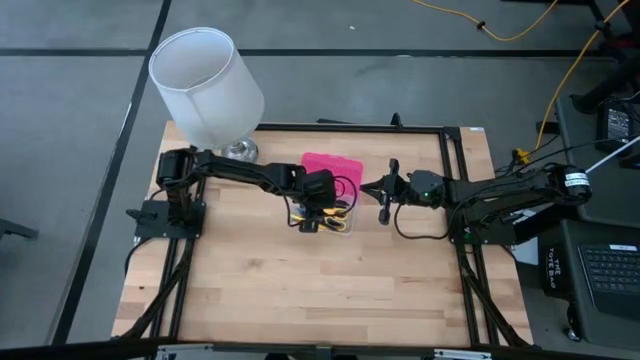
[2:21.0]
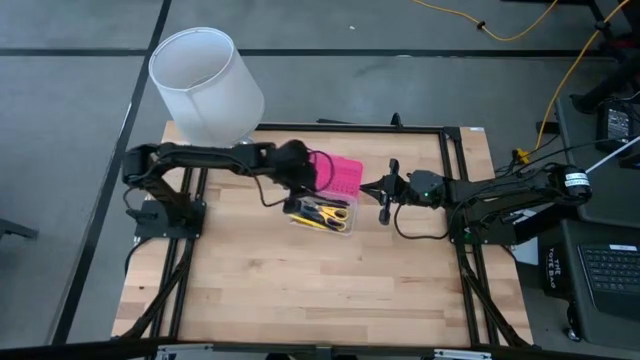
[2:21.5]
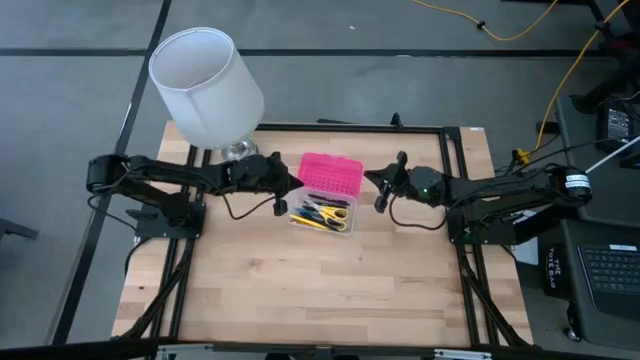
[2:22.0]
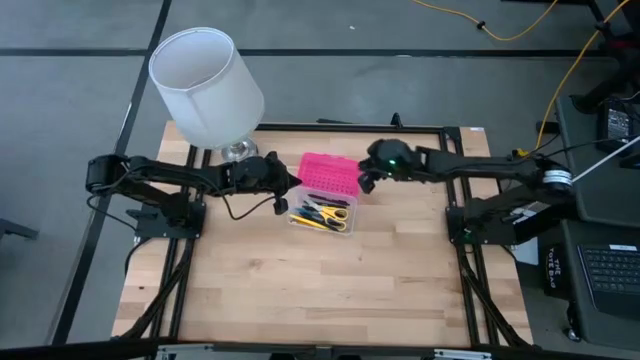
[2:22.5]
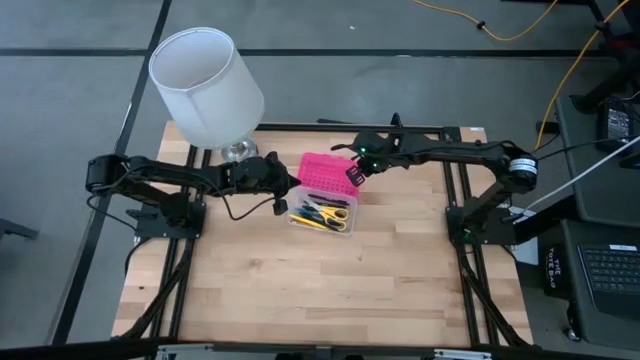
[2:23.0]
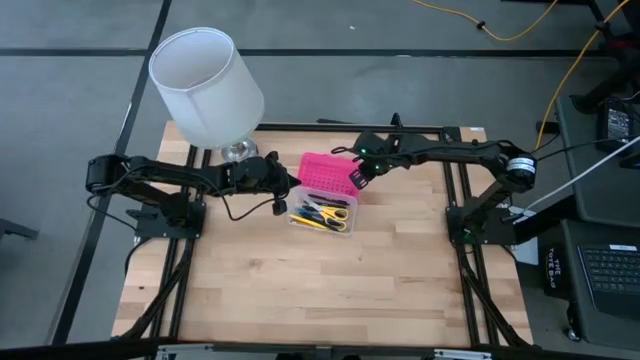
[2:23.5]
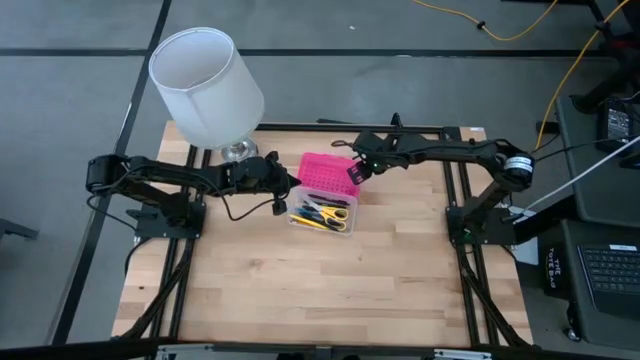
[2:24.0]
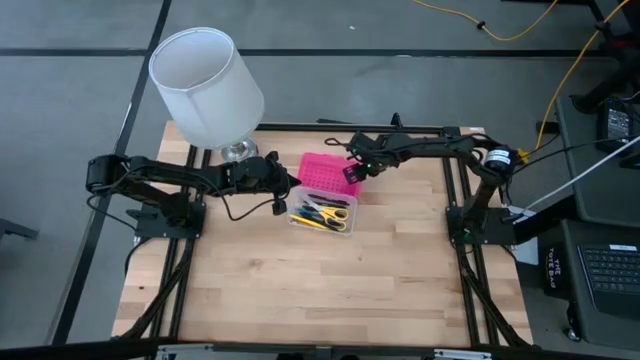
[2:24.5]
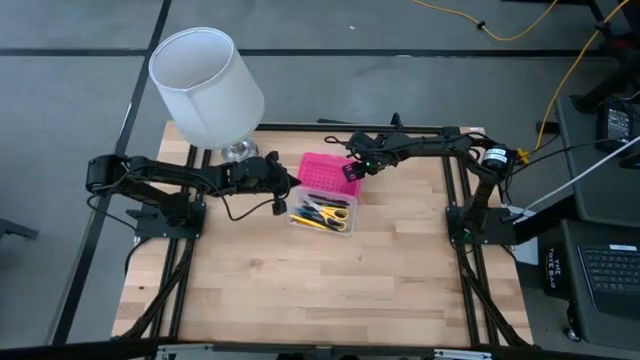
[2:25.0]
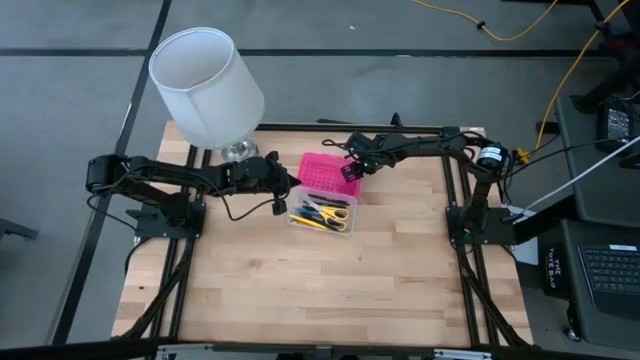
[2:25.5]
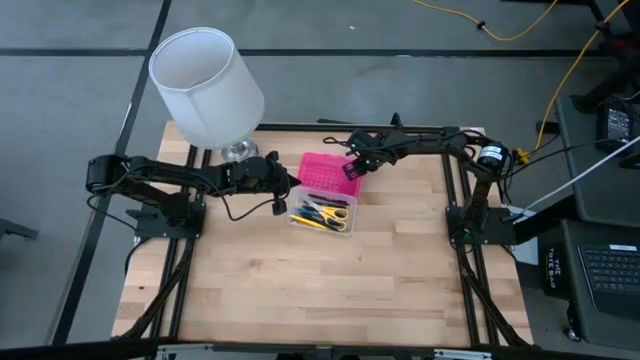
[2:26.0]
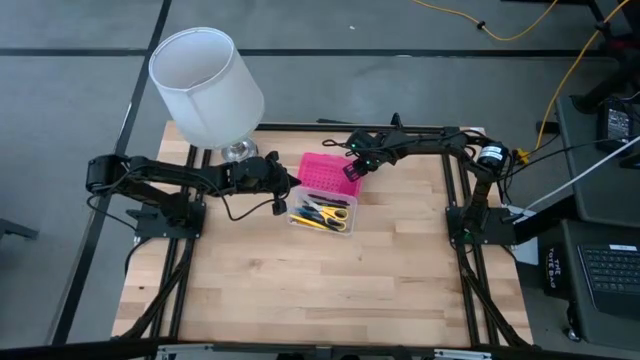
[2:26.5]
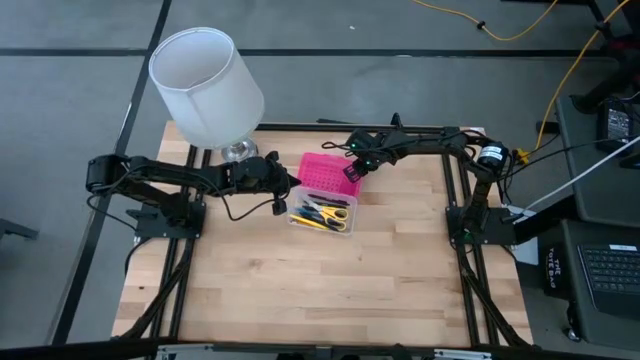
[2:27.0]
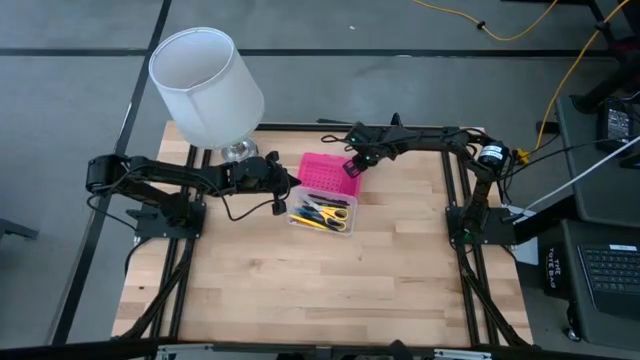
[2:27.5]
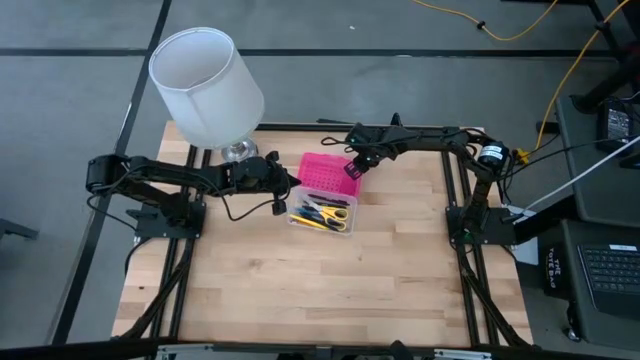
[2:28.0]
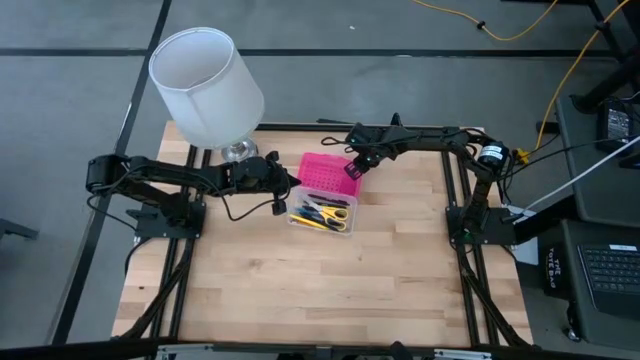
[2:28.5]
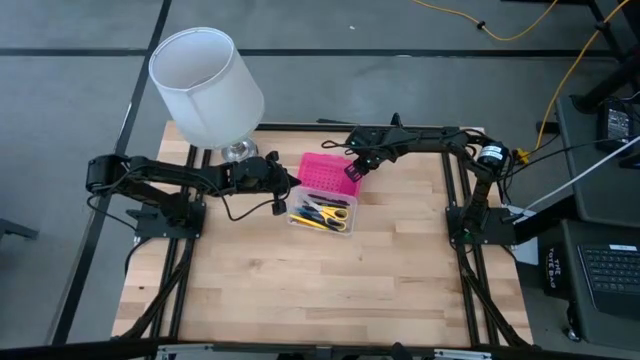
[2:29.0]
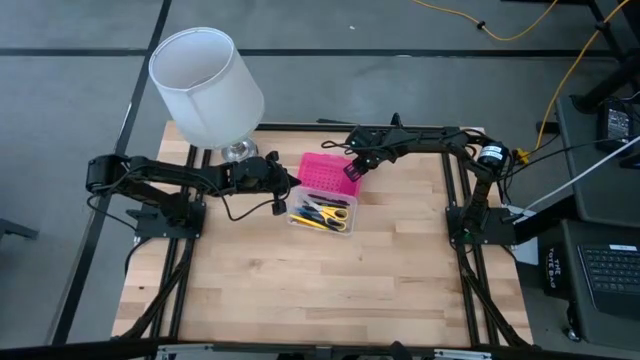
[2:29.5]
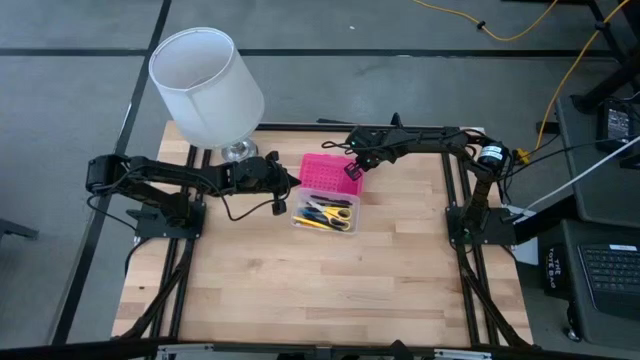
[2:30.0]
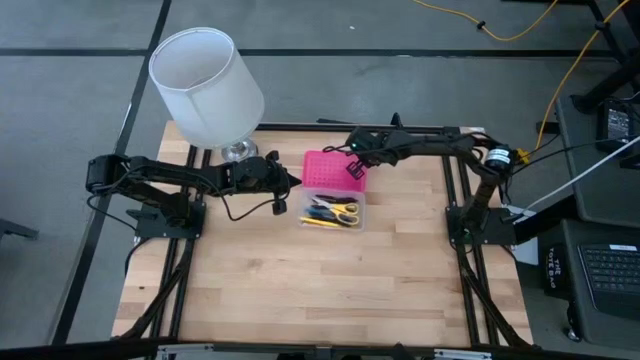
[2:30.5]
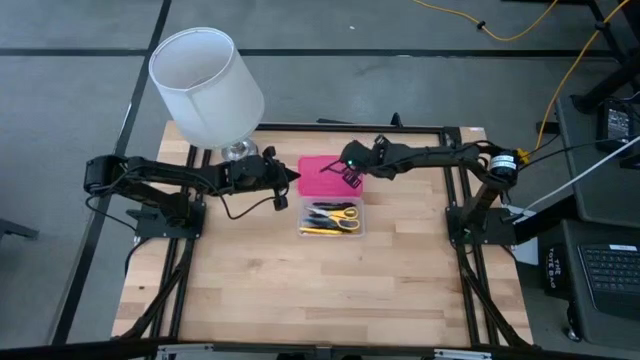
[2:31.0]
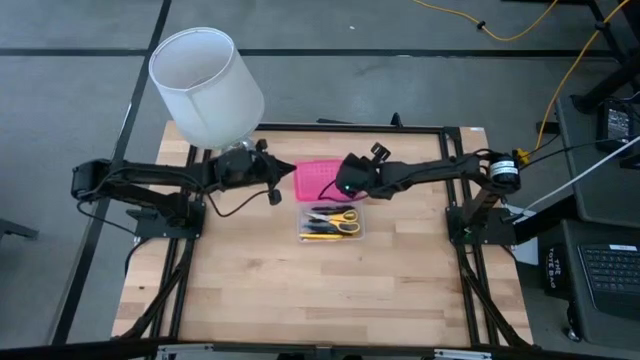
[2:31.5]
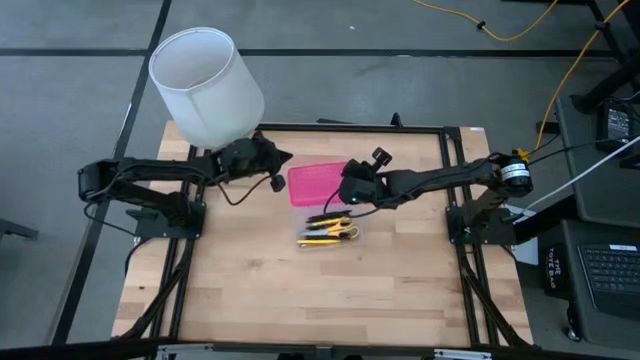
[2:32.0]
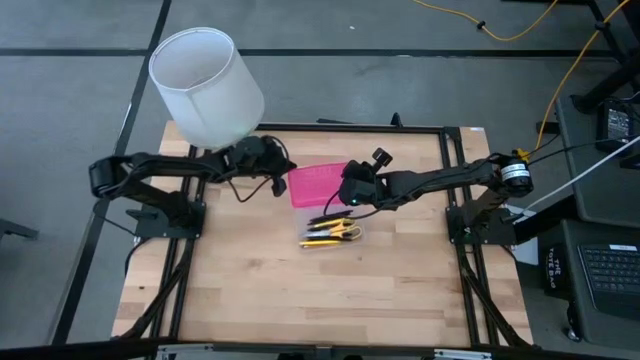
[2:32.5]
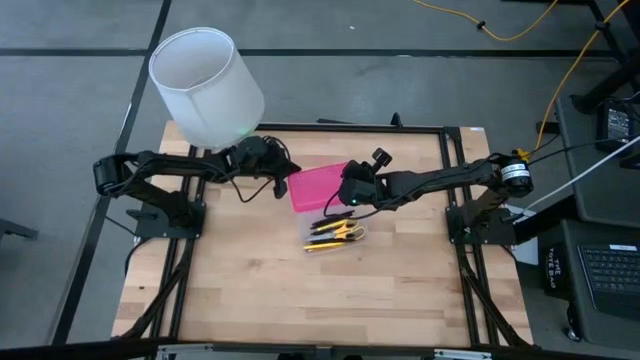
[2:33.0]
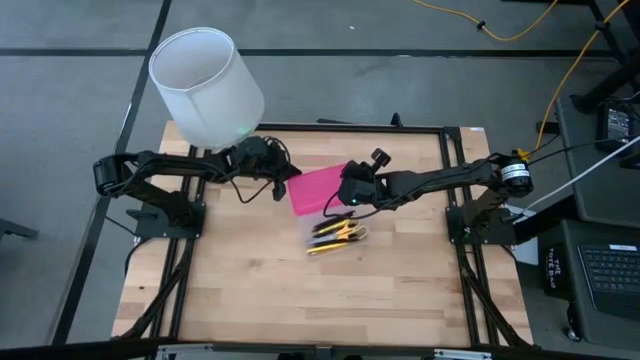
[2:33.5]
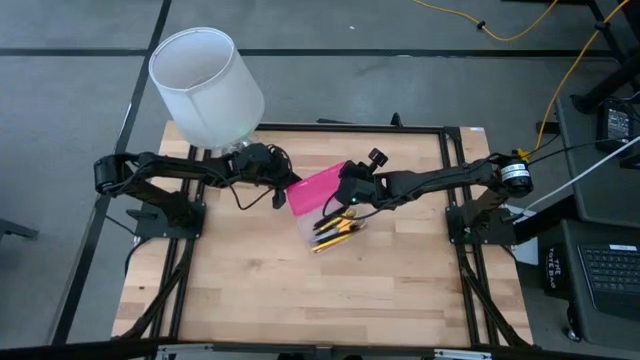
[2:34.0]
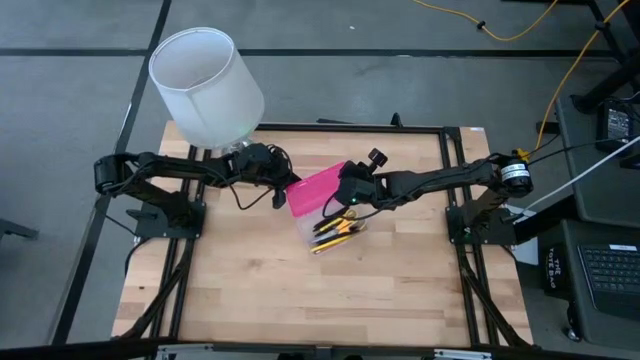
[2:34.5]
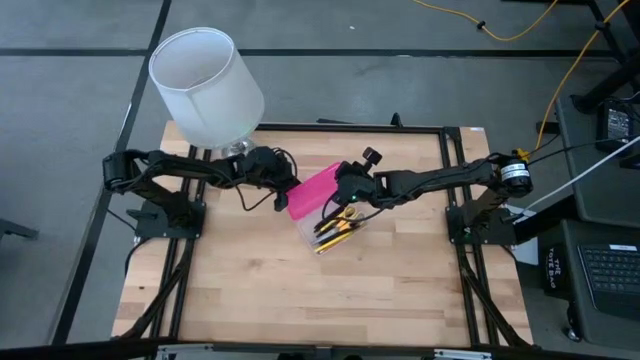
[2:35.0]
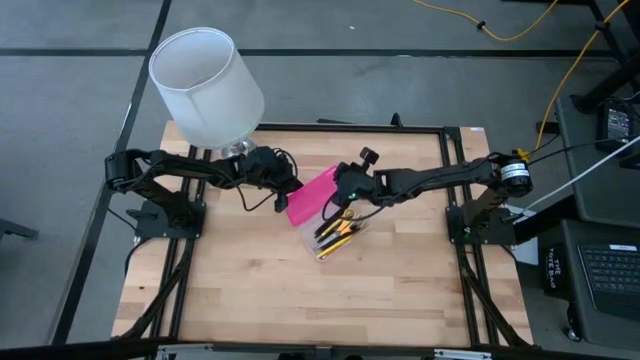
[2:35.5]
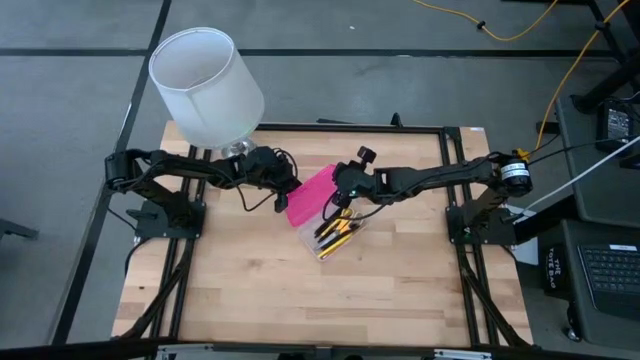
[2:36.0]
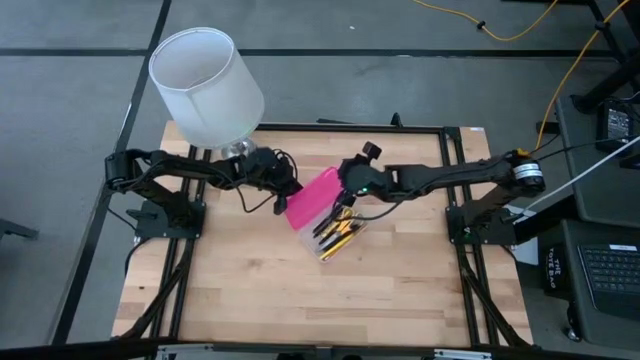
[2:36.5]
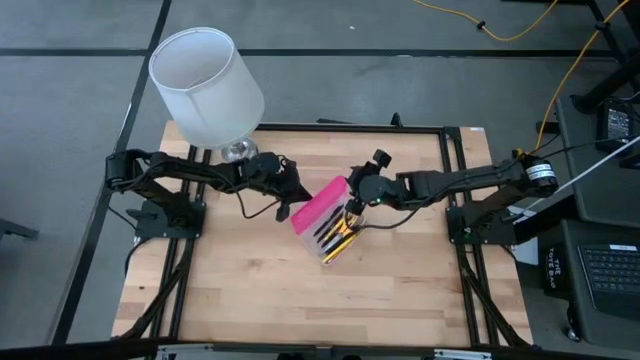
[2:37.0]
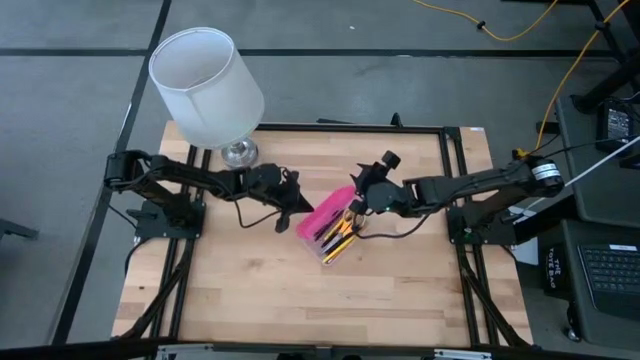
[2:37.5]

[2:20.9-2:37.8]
Task: Pick & place school supplies into a supply box
Close the transparent supply box

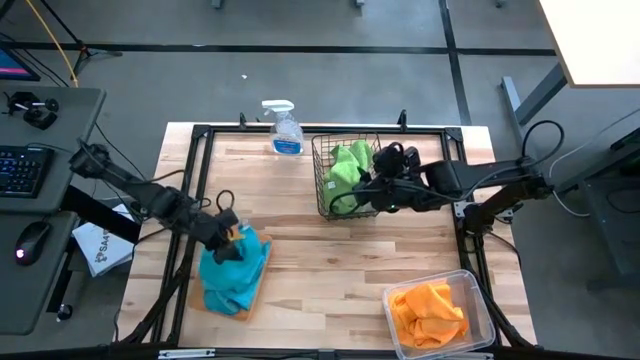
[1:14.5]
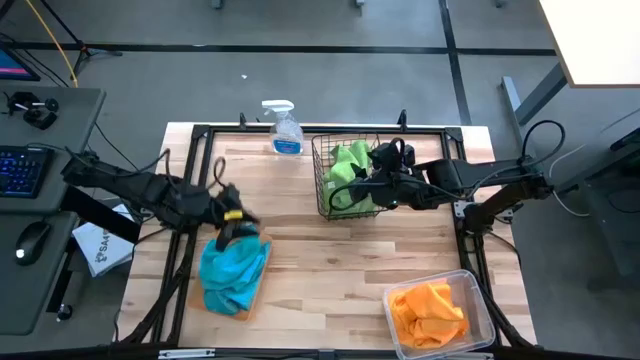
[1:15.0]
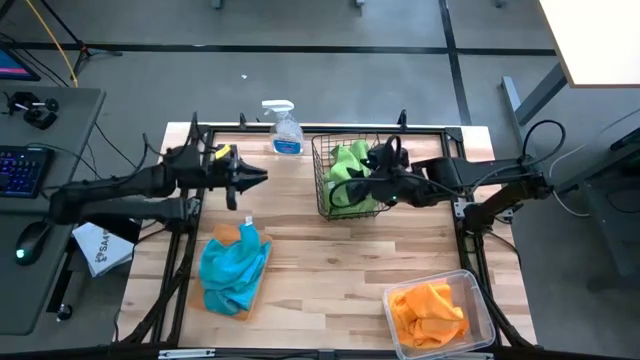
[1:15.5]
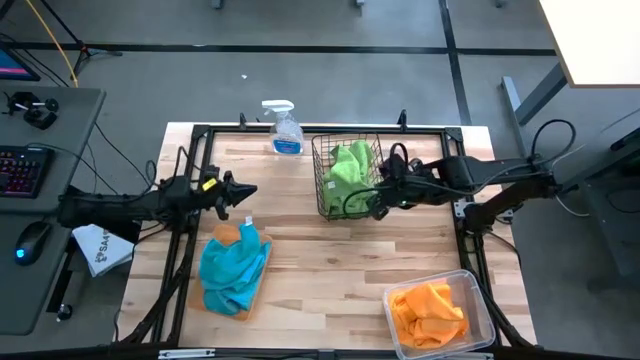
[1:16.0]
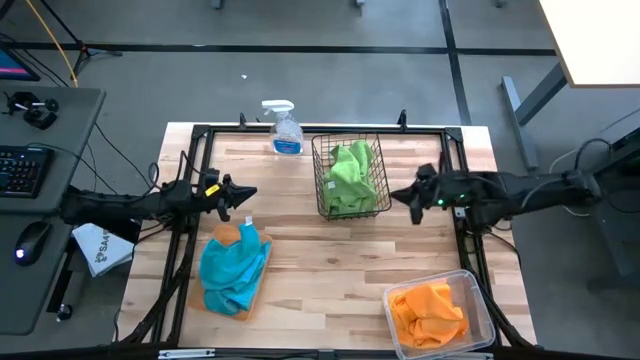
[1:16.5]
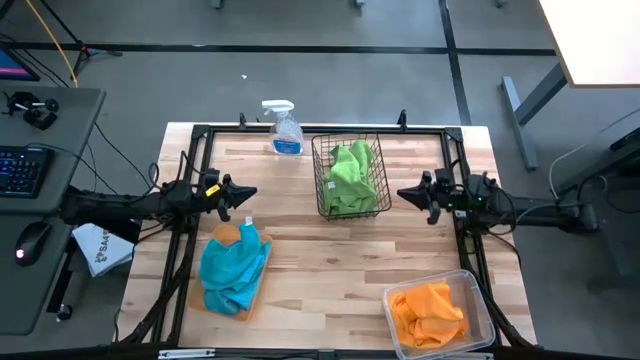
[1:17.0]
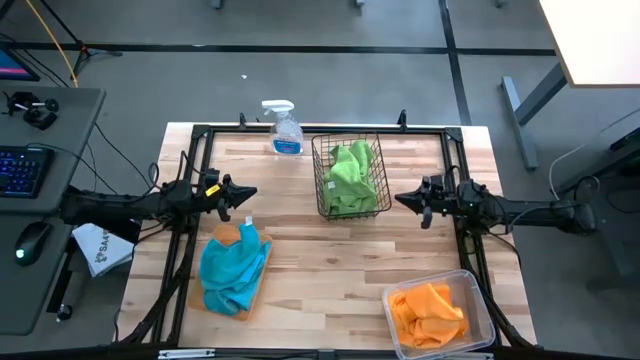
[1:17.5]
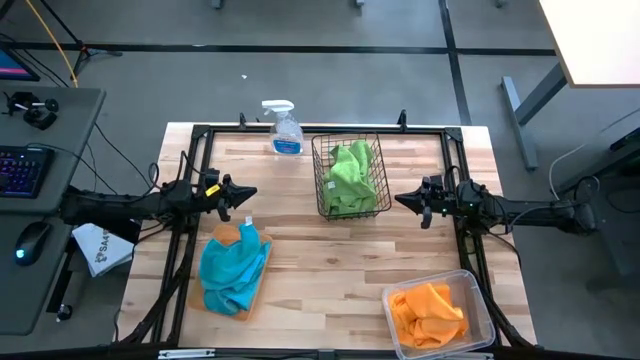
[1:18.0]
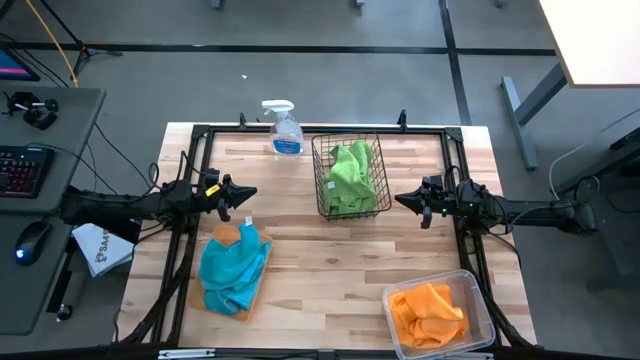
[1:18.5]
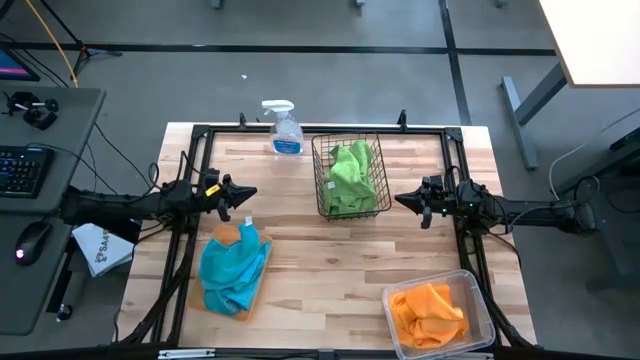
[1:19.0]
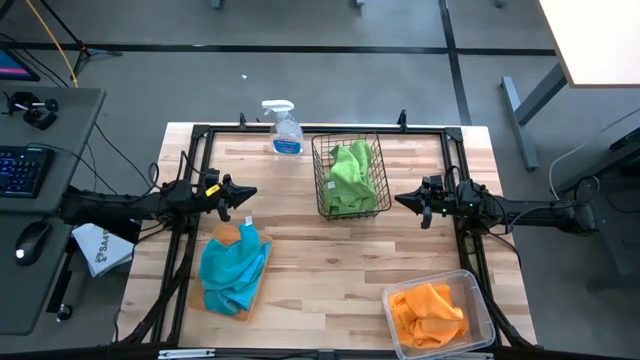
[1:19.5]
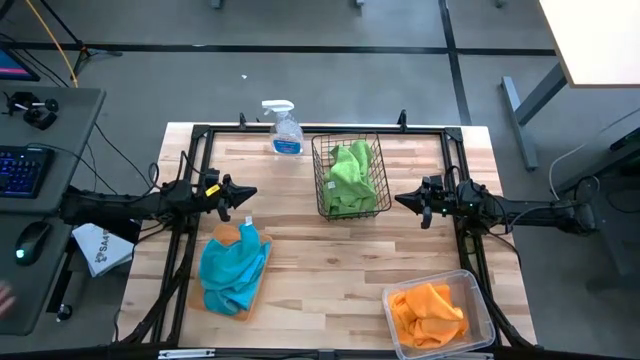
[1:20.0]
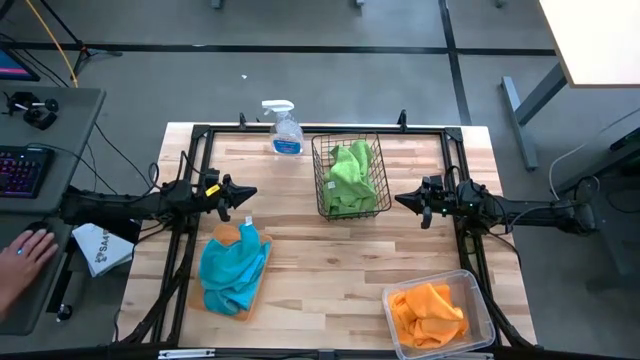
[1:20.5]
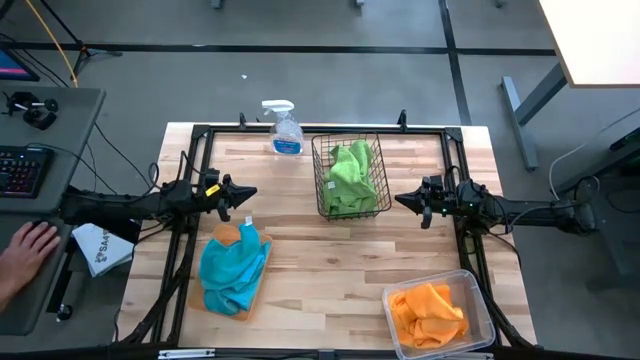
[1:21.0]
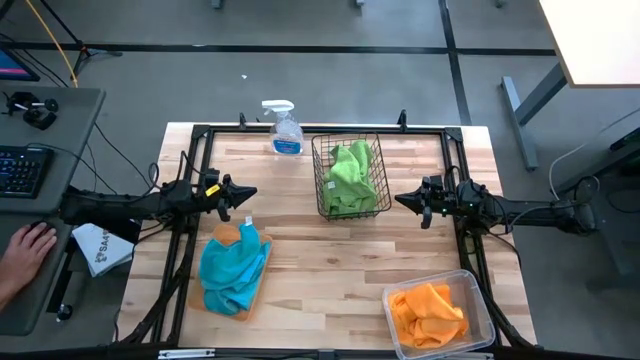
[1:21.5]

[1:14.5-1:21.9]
Task: Sort microfiber towel by color & place in baskets
Return to Home Position
